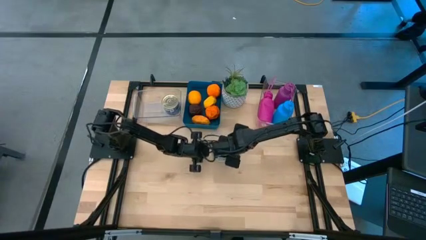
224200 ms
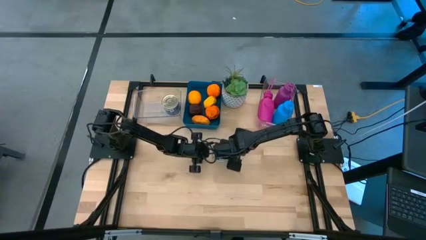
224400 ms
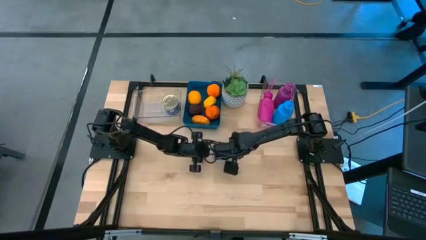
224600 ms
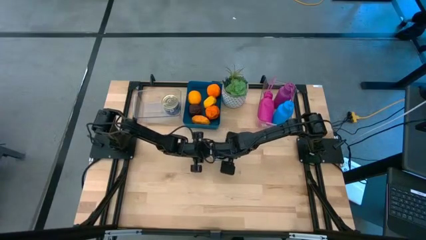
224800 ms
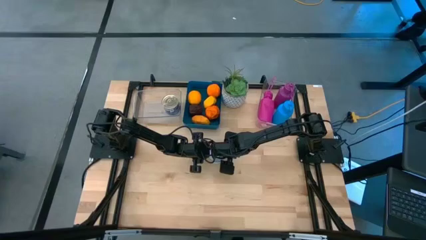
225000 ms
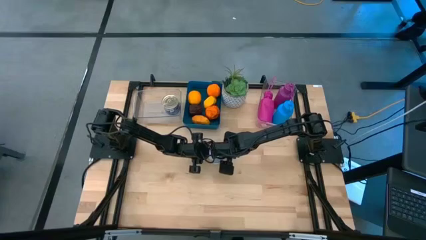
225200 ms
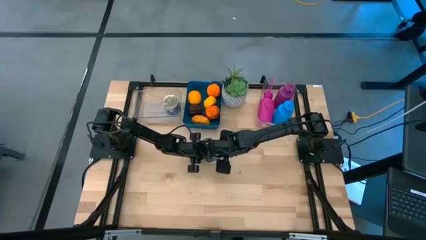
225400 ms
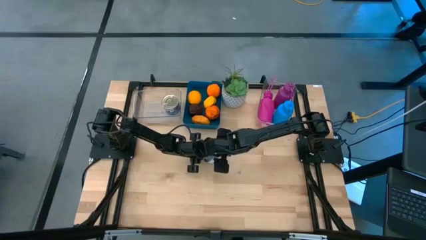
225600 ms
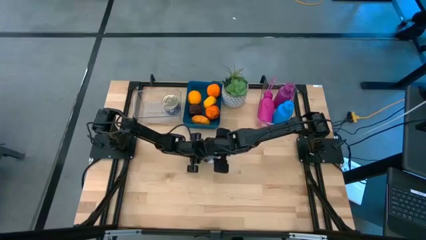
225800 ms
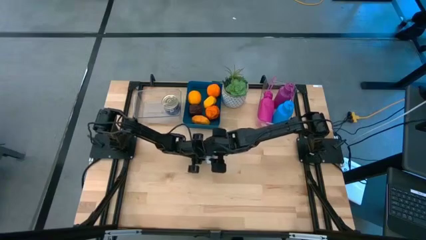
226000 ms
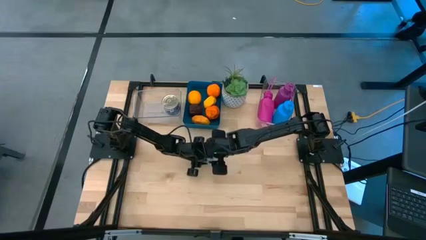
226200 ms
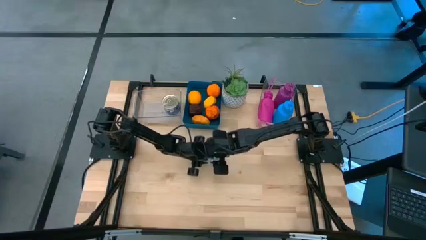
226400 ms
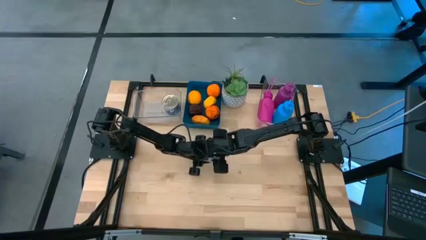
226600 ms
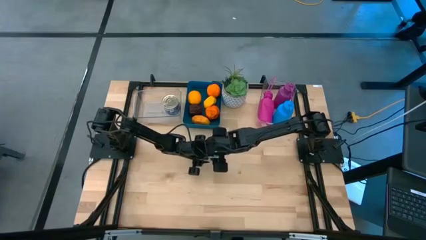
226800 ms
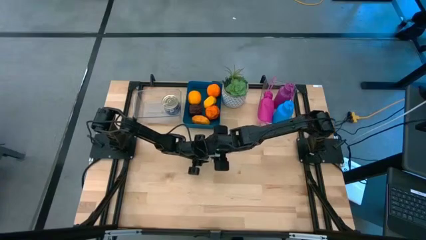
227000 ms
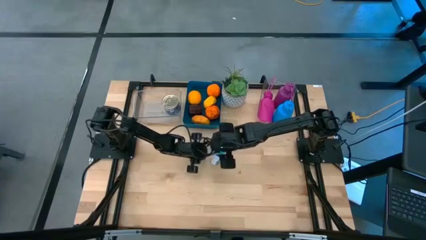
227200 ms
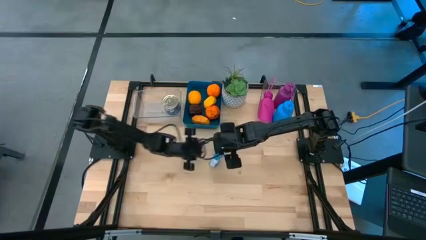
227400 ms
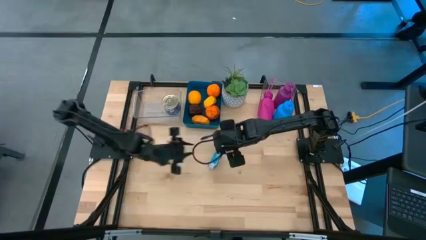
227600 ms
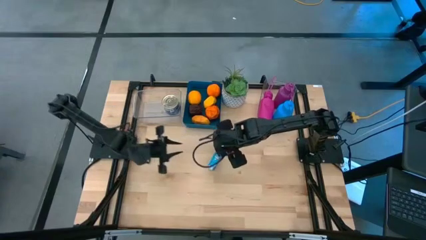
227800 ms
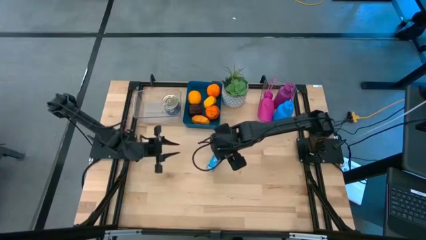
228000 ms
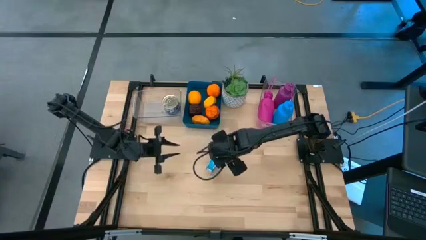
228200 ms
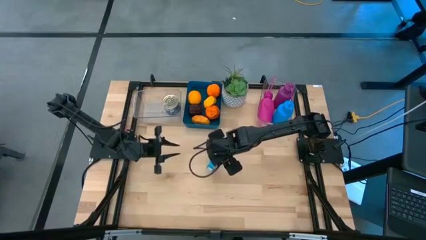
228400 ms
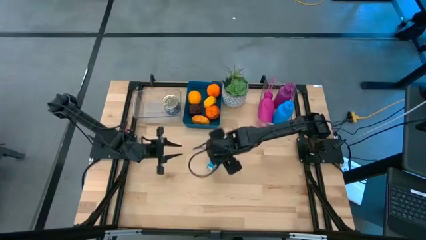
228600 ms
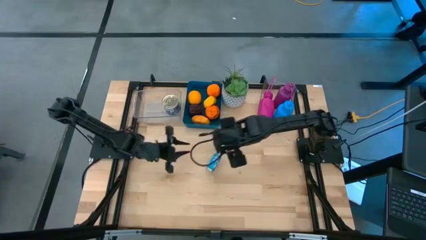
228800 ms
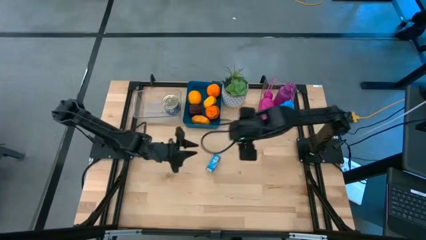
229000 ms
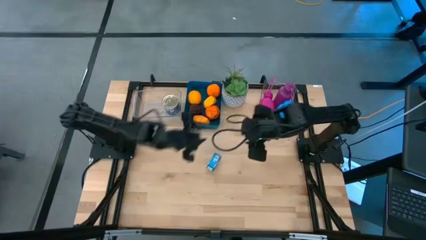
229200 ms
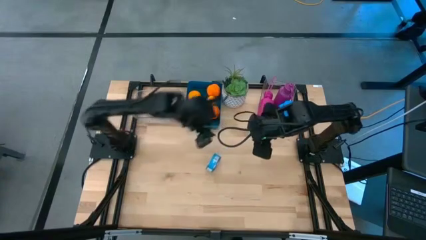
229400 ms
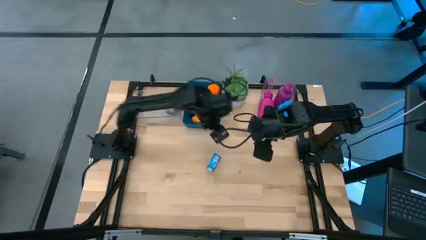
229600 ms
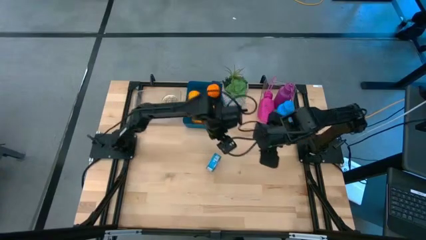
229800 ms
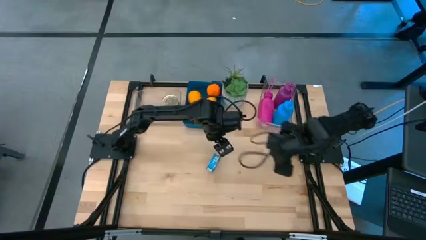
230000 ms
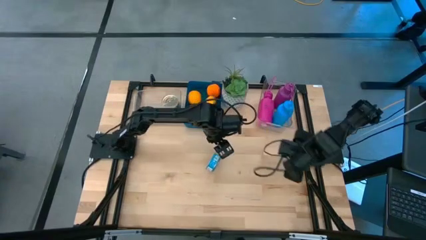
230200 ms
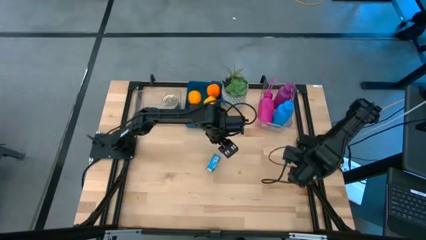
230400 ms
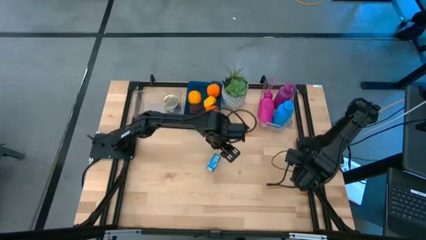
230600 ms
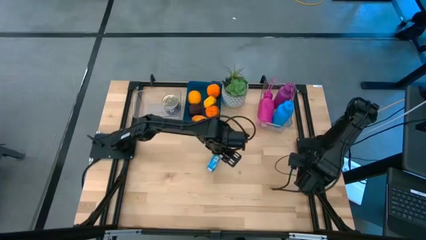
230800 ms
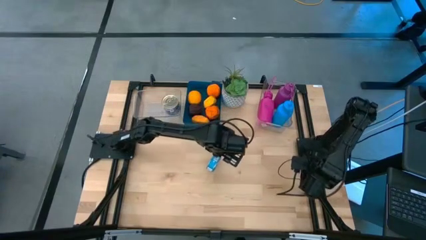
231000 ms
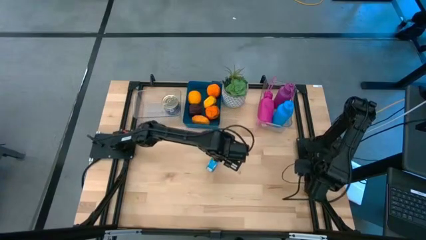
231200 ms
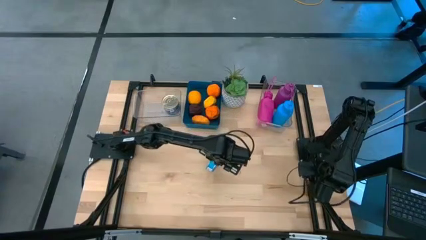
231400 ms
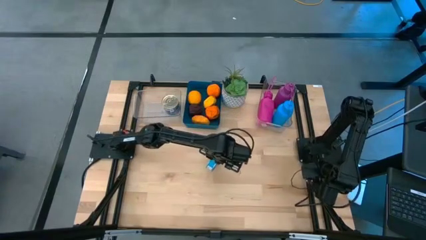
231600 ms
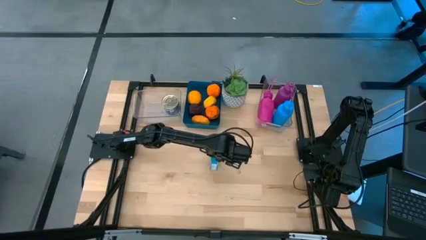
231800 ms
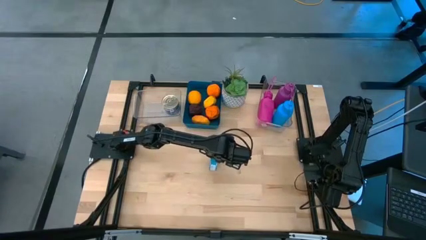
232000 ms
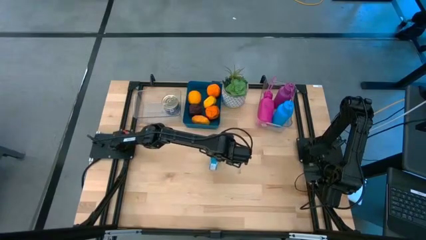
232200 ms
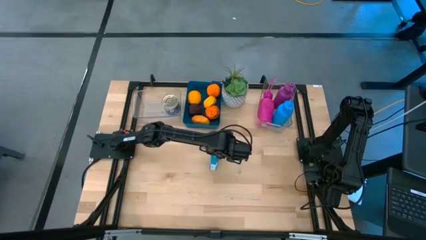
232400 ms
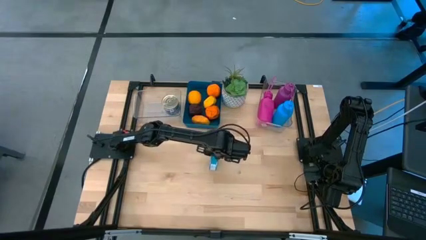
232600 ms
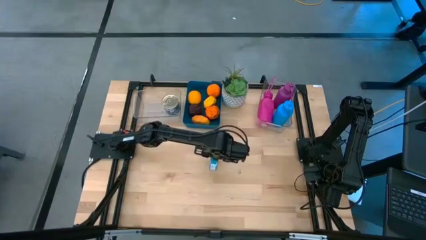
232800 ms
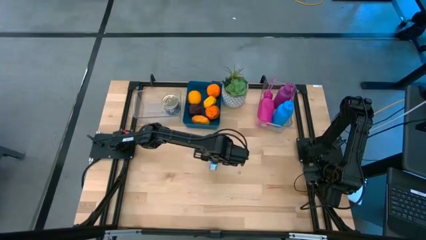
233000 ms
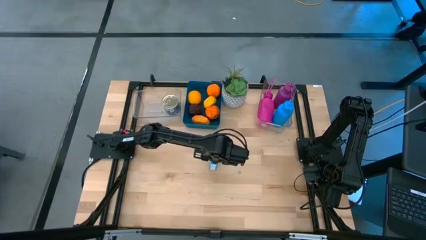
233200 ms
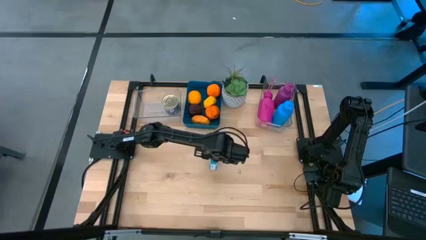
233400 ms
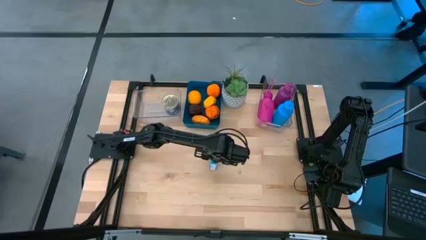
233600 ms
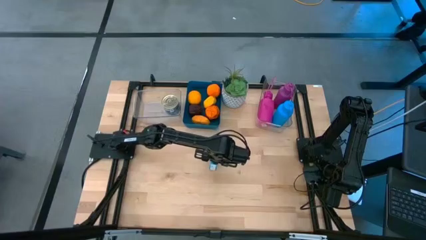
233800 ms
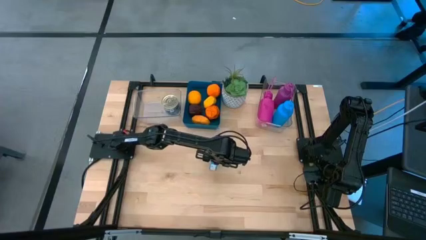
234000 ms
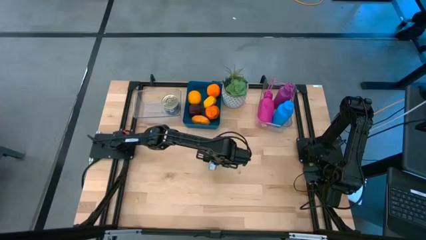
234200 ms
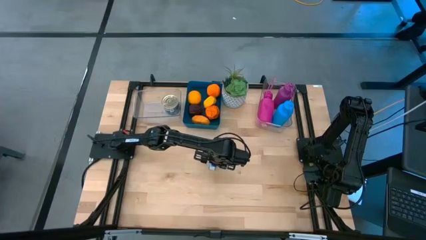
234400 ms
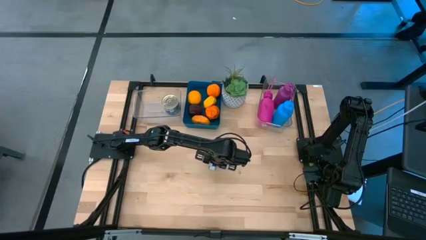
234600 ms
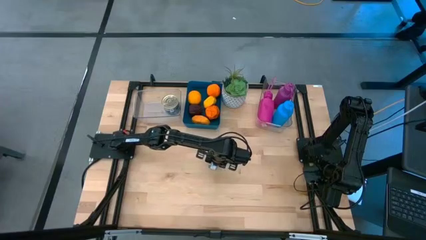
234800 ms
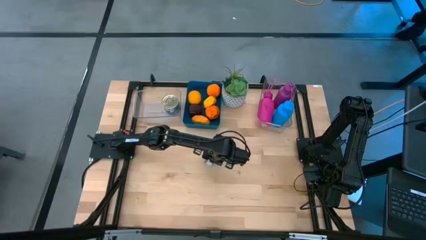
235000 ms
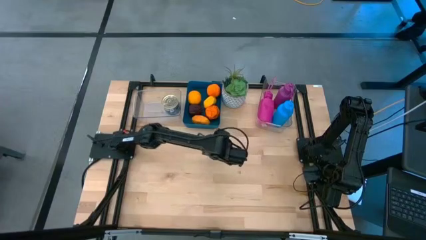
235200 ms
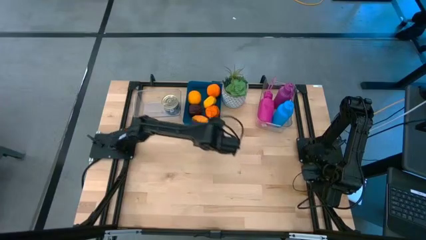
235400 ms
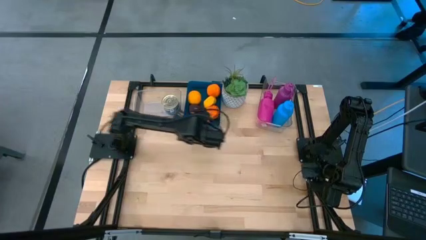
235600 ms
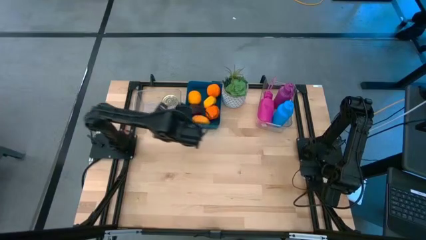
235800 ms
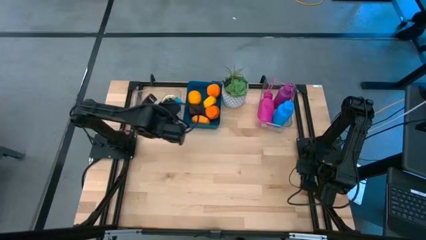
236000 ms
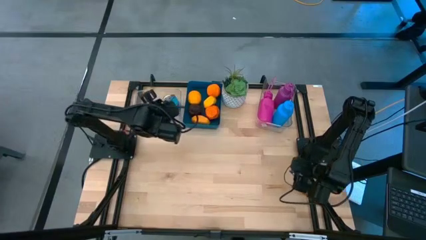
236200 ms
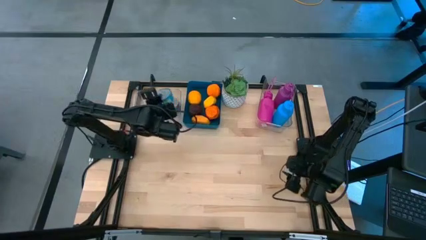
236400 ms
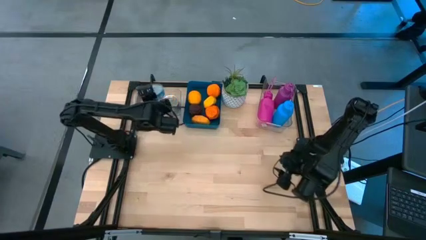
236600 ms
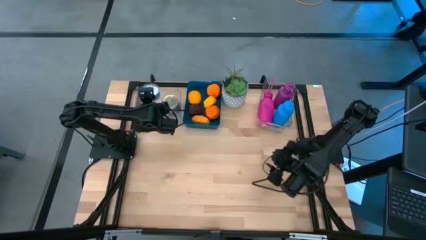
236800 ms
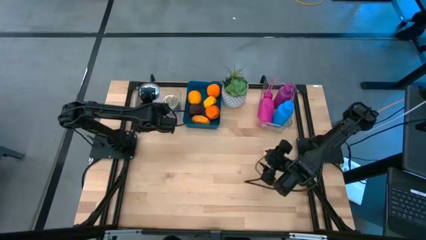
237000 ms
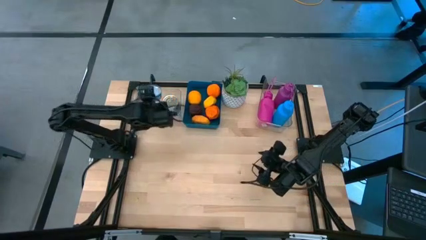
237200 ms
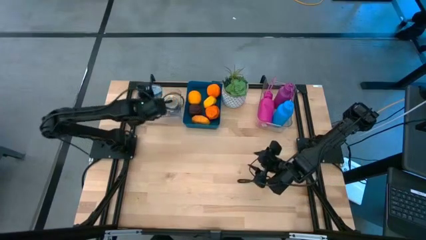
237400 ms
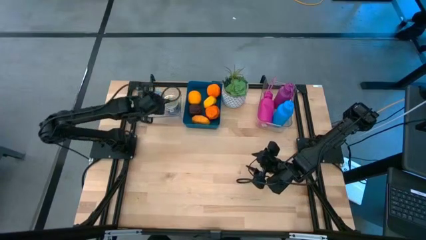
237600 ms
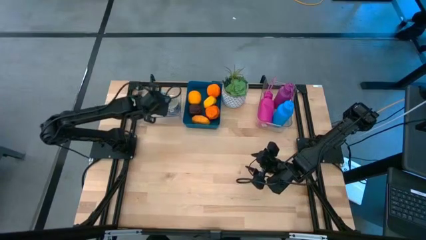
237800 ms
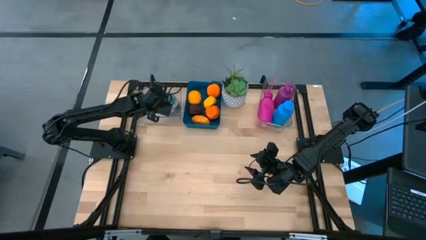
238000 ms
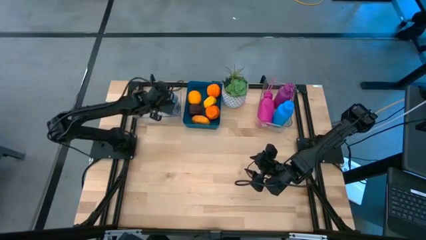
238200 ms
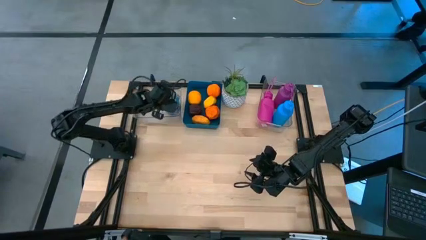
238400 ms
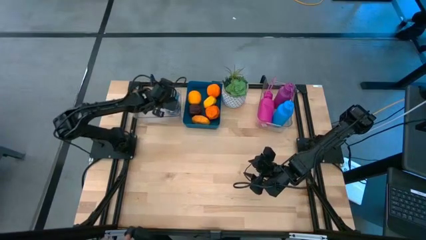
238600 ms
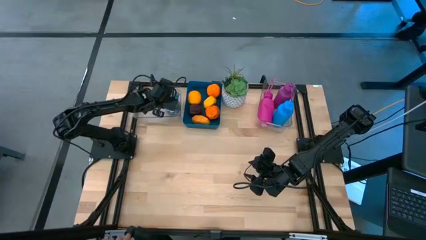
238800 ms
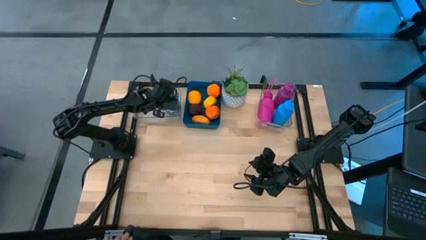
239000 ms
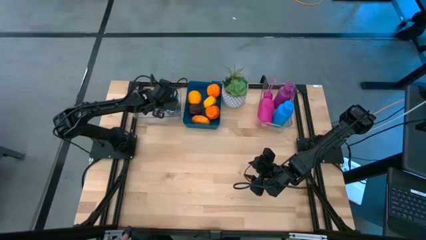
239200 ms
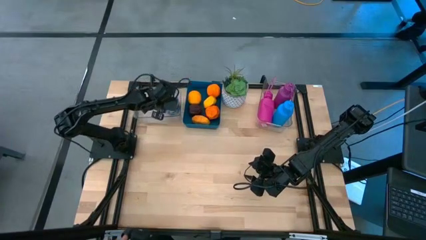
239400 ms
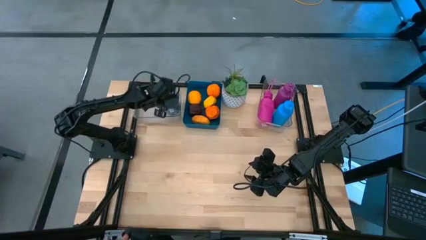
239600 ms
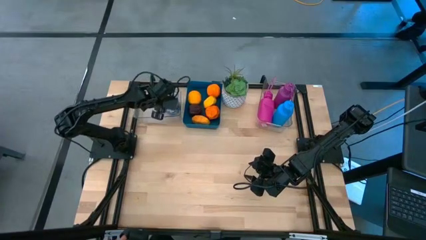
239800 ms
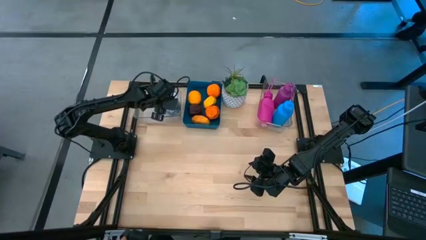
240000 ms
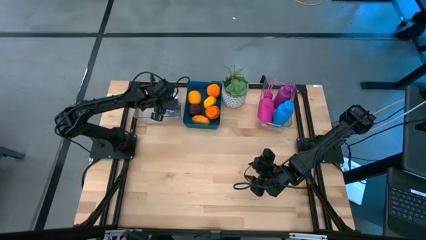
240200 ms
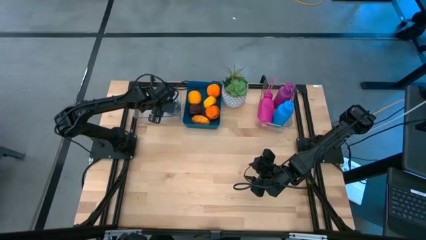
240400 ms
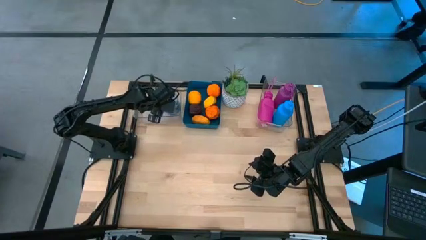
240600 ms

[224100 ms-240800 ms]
Task: Pick & Place Food Item
Stack the light blue tuna can on top of the blue and pink tuna can into the left transparent bin
